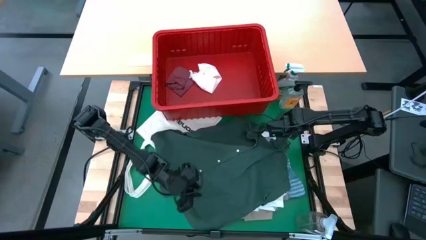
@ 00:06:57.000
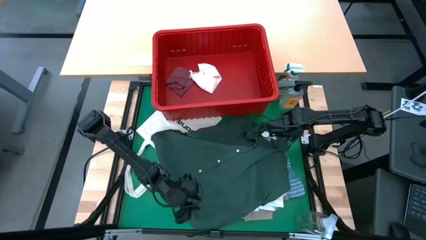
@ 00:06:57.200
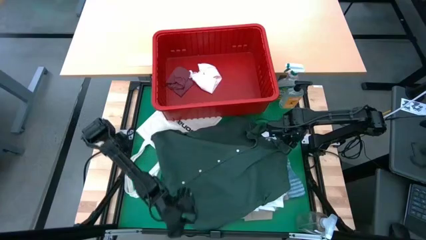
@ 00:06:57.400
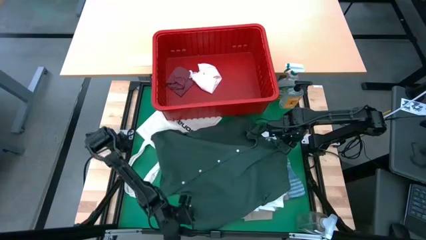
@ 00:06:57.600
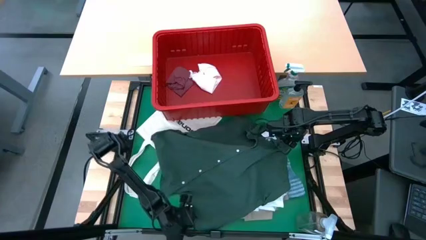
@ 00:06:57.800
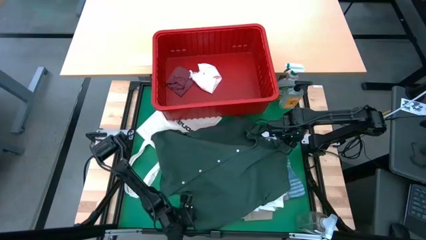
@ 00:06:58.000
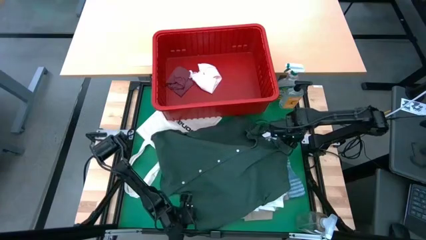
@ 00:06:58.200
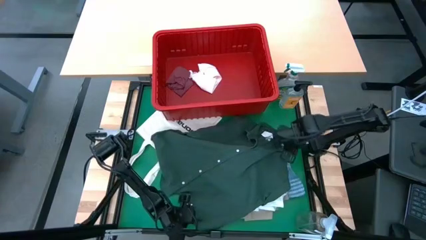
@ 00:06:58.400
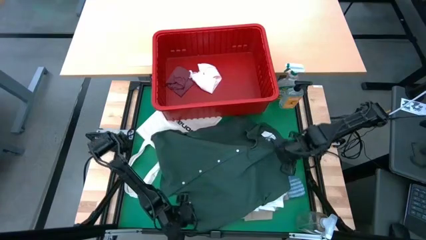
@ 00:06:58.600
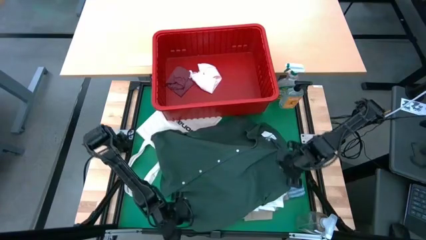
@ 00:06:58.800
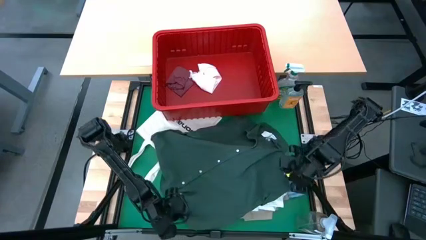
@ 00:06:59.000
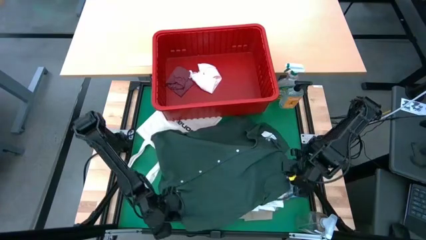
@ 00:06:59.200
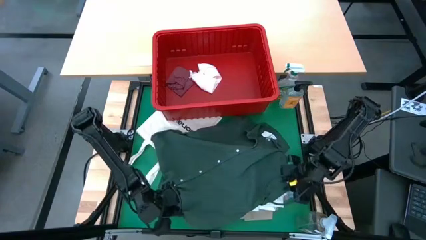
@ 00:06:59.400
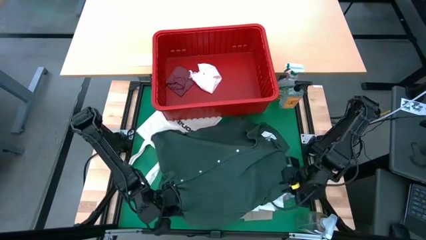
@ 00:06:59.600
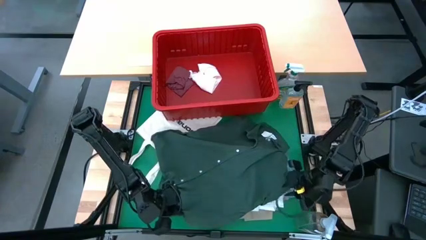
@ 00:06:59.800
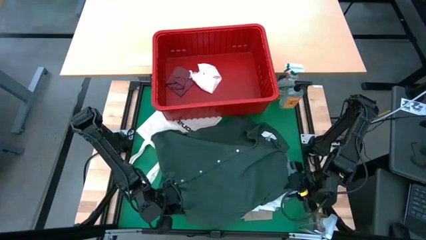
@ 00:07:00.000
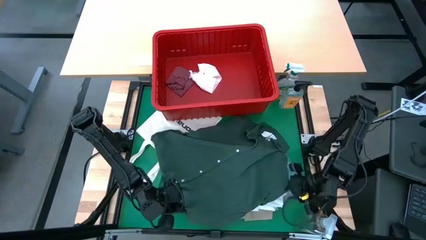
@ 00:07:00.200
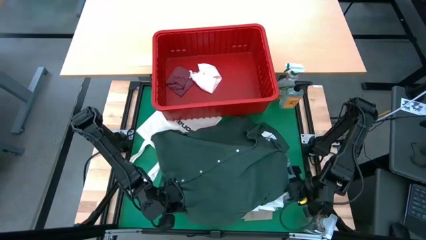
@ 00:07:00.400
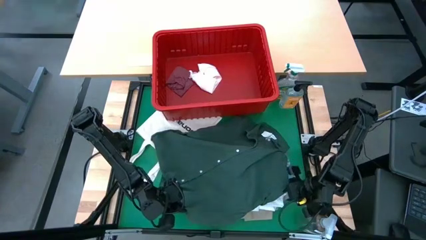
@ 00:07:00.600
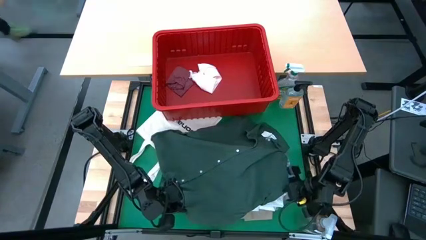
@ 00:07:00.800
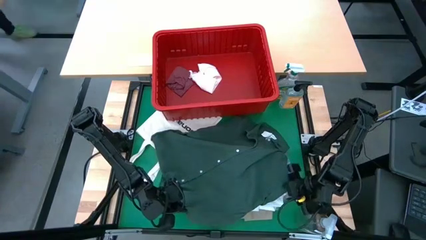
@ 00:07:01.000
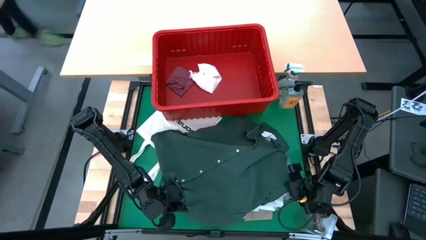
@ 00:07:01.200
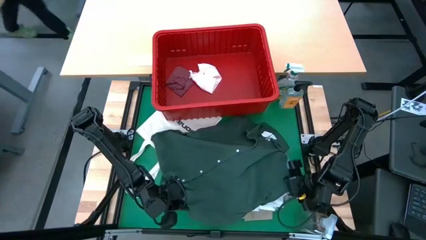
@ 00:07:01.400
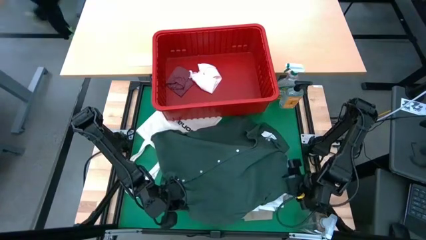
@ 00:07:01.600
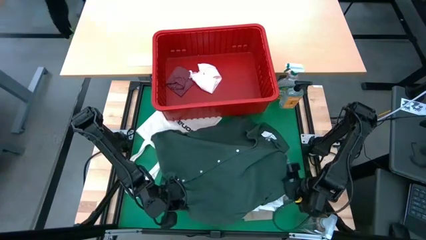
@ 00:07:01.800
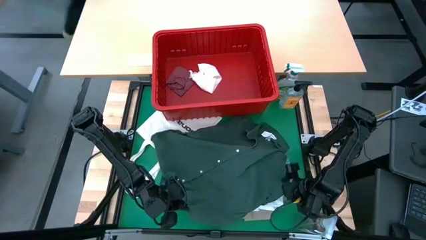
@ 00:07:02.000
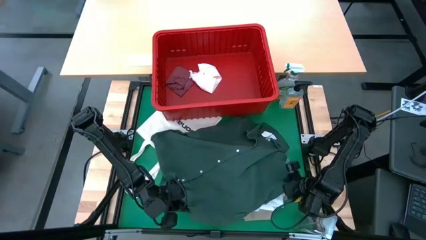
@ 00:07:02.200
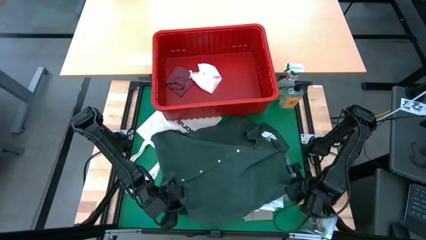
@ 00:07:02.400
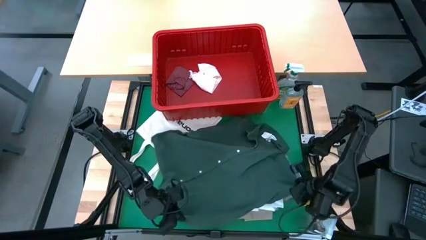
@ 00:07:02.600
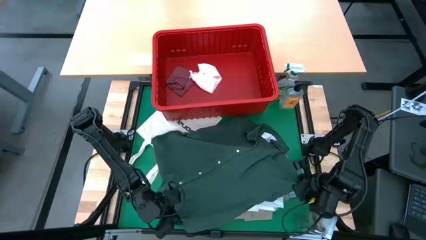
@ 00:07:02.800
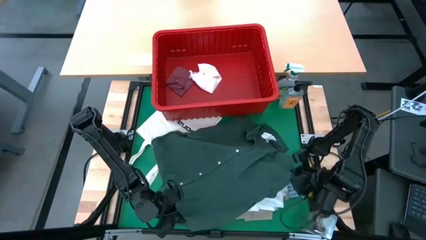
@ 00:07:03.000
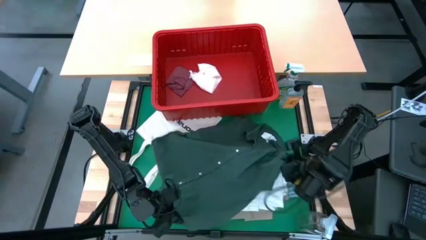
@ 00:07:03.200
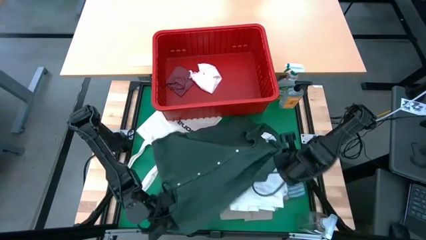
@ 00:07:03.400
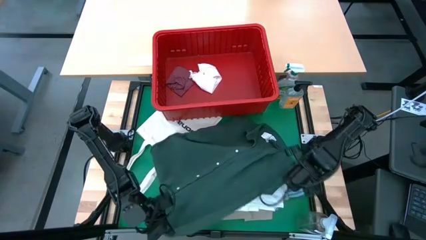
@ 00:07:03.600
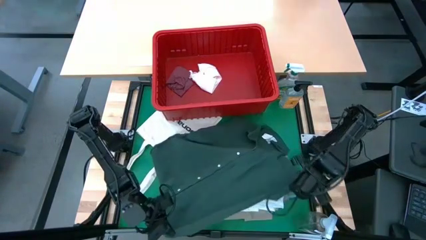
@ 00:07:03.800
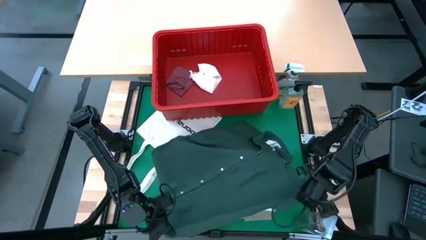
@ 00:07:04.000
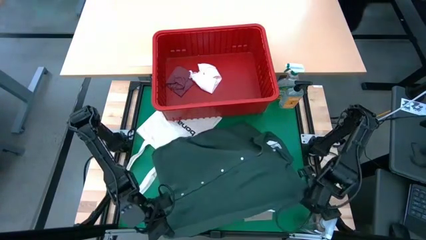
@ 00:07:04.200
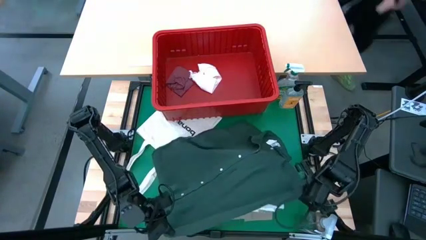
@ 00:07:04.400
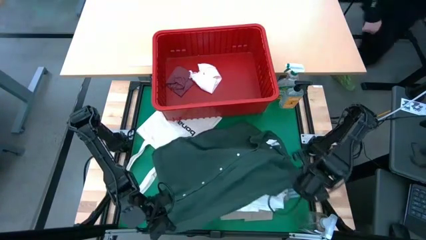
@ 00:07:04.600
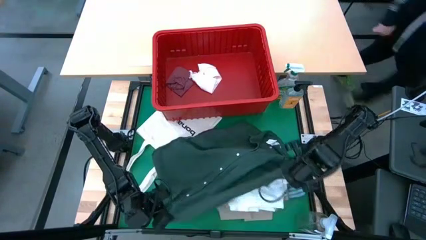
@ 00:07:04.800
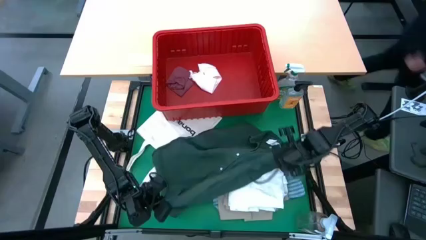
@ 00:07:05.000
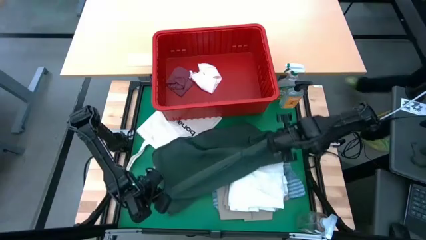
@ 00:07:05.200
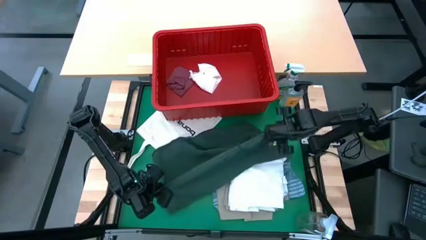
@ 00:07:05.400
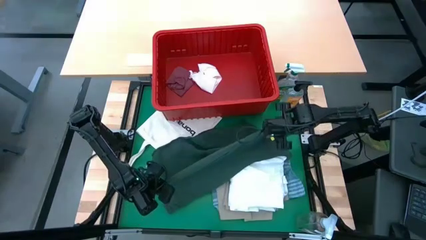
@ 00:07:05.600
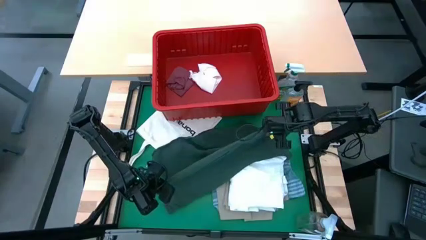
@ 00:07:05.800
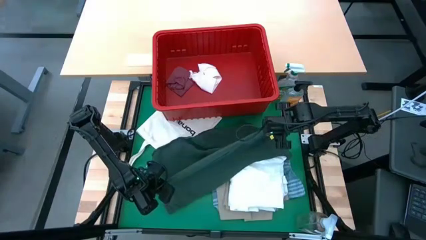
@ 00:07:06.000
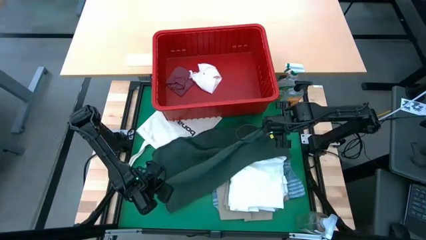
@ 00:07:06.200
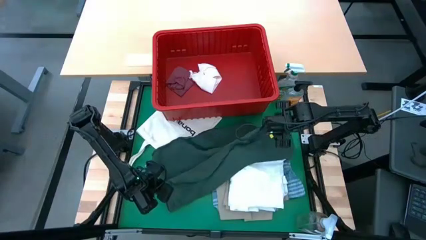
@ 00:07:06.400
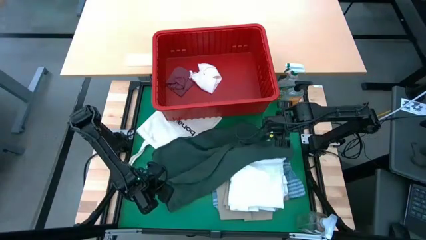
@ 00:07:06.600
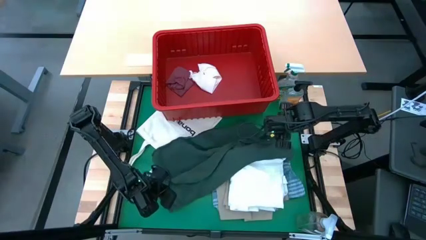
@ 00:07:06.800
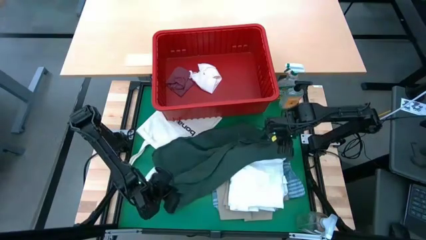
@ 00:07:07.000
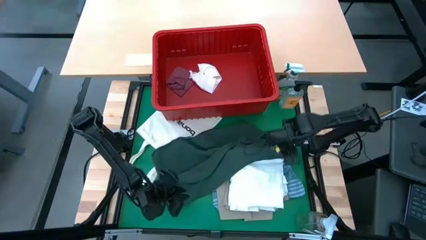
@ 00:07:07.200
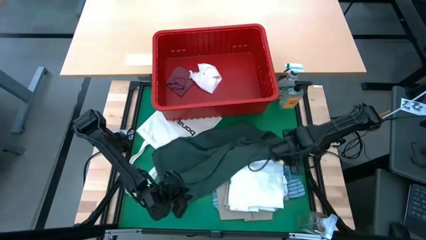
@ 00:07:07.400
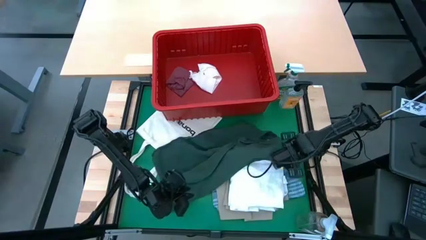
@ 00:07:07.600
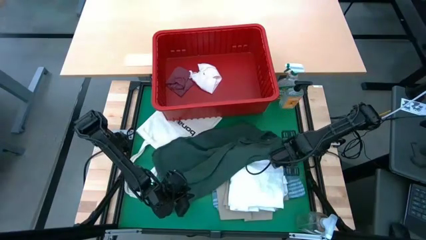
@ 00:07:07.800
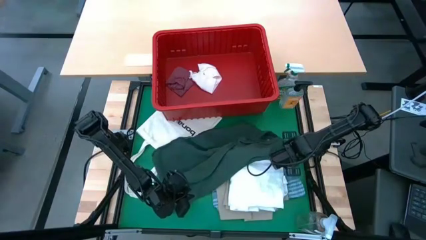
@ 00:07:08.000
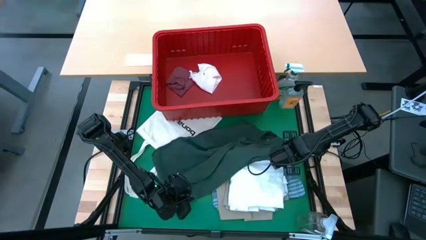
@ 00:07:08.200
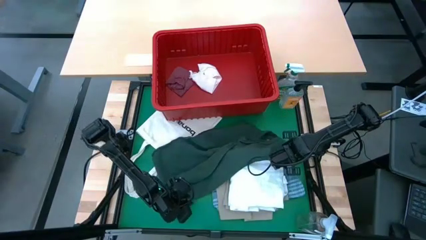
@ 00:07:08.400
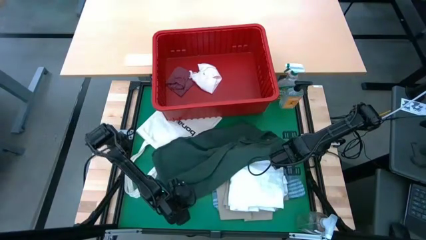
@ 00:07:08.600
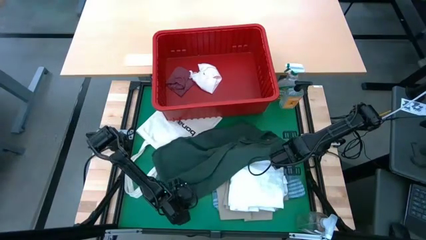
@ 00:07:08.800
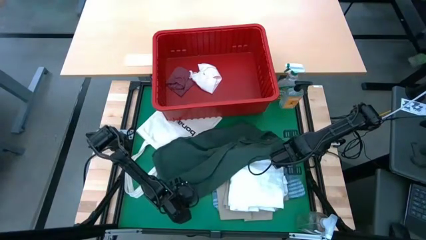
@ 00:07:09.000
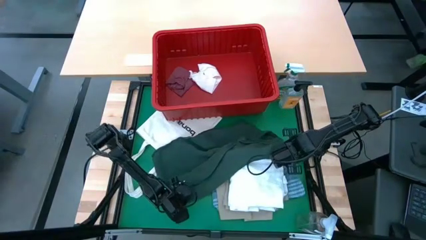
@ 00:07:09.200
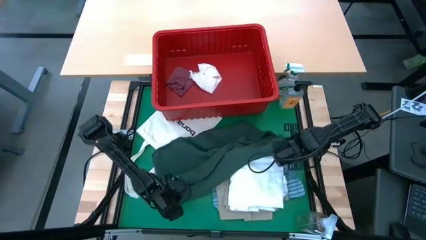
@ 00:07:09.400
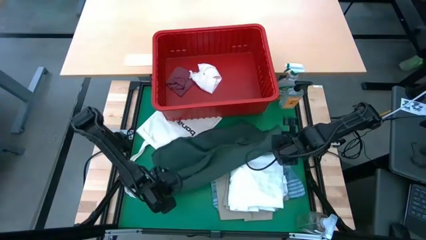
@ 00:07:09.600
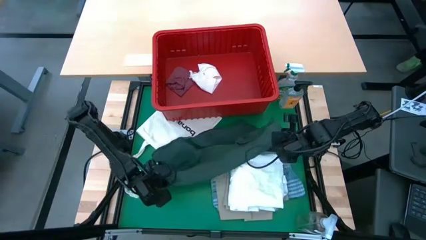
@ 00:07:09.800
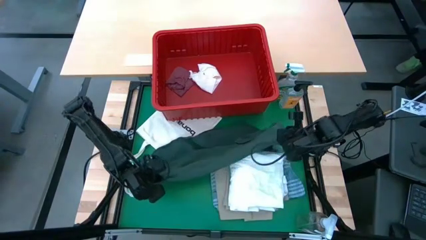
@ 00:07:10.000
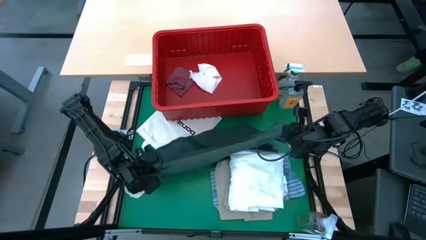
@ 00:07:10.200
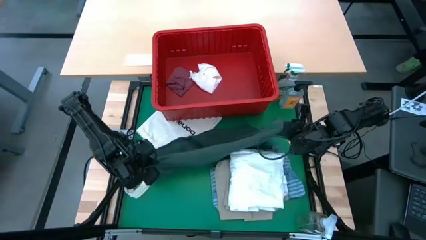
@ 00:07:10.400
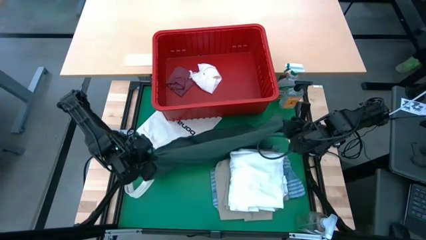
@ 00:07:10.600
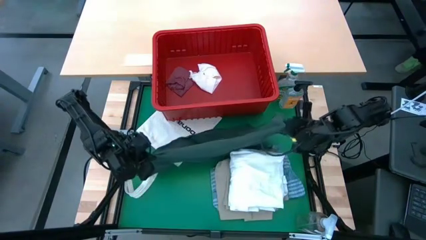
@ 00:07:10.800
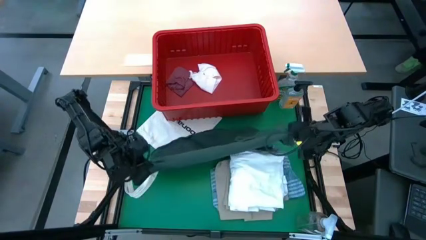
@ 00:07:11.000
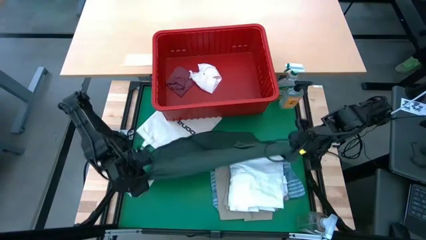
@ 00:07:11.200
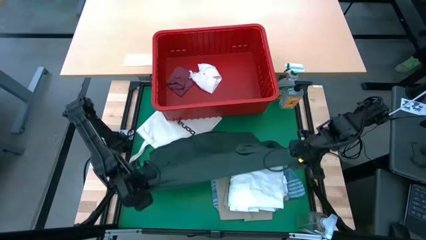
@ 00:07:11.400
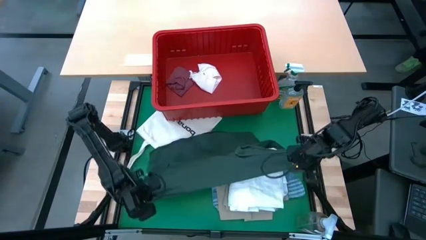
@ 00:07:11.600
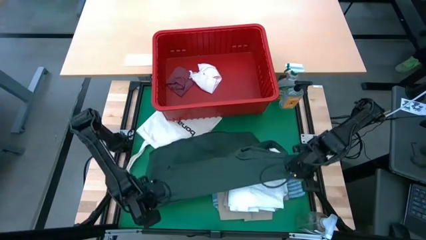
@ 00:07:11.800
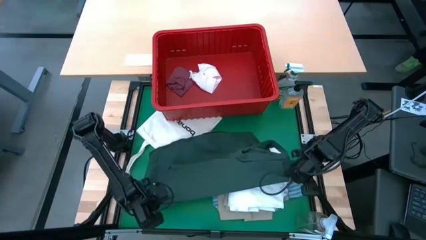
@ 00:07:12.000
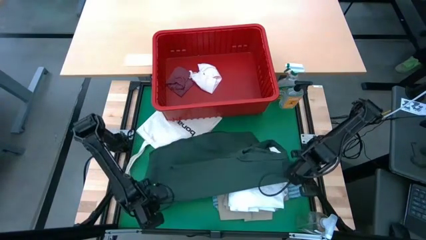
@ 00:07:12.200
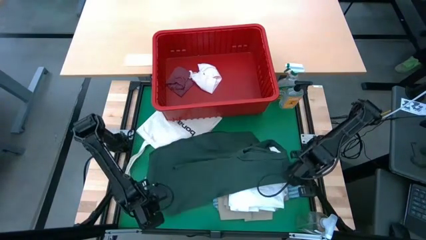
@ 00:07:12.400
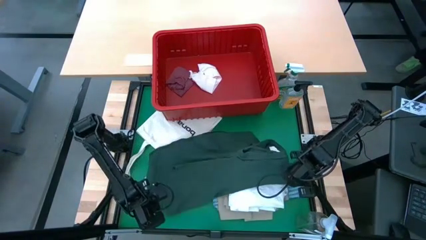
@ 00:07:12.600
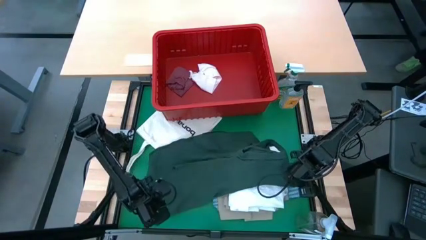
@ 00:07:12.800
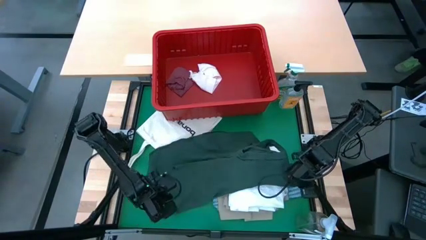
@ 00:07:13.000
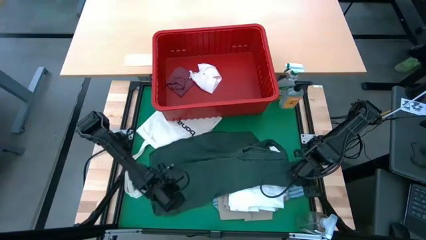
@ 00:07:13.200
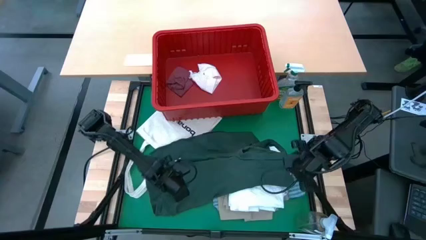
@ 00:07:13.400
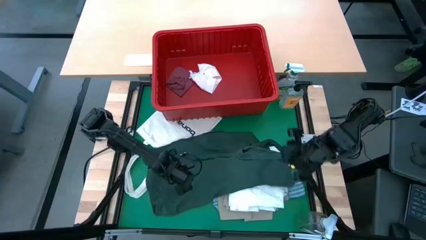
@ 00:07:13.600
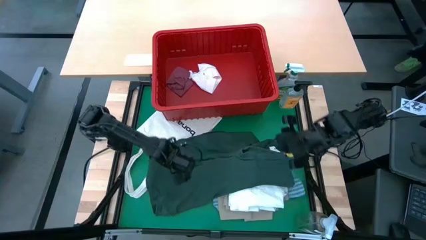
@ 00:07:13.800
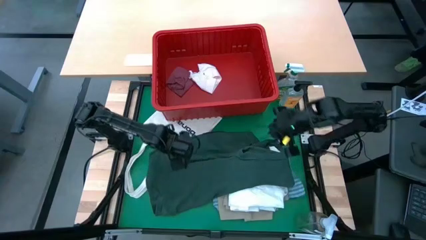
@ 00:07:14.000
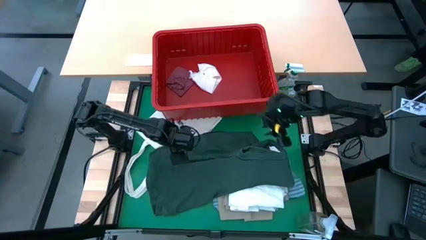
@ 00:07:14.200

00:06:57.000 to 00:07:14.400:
Task: Fold Laundry from Bin
Fold the green shirt
